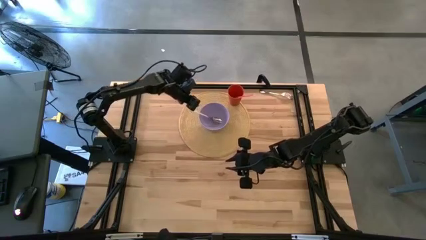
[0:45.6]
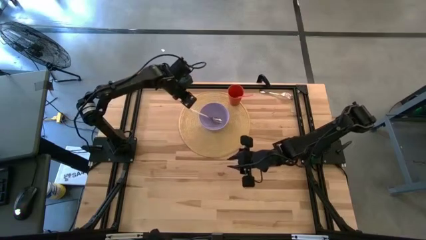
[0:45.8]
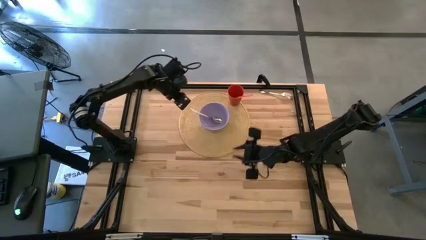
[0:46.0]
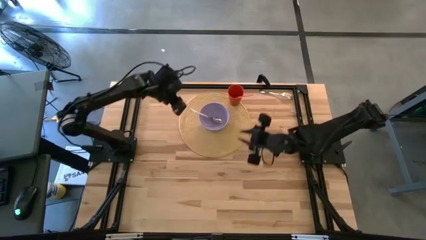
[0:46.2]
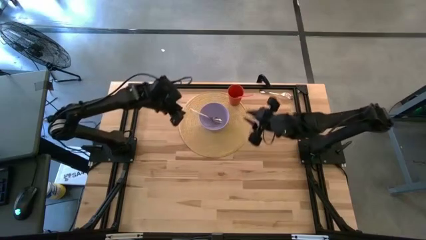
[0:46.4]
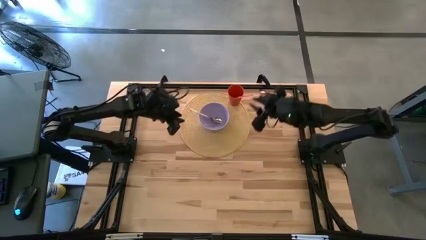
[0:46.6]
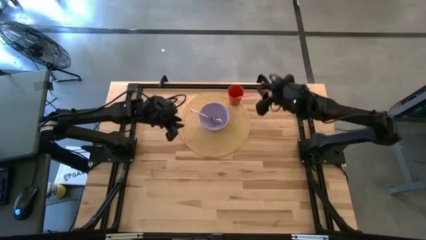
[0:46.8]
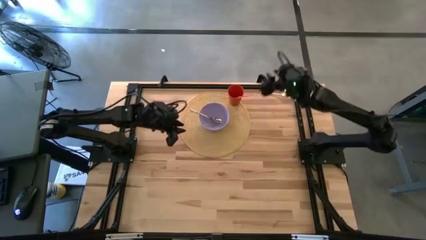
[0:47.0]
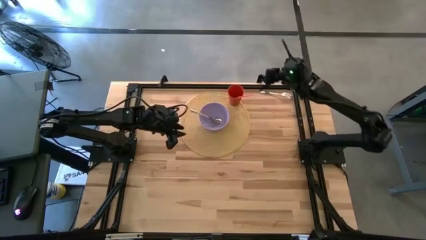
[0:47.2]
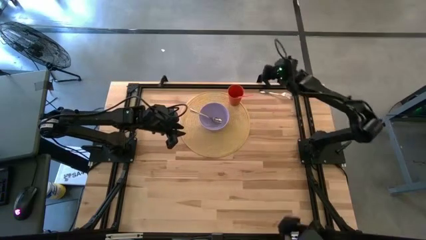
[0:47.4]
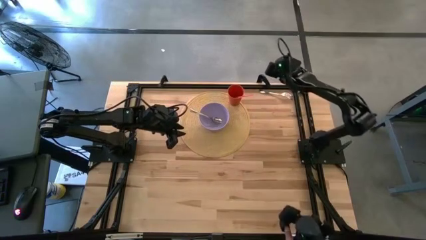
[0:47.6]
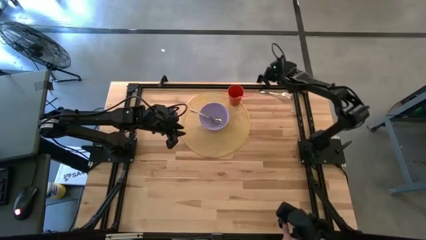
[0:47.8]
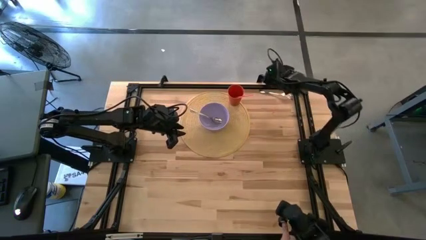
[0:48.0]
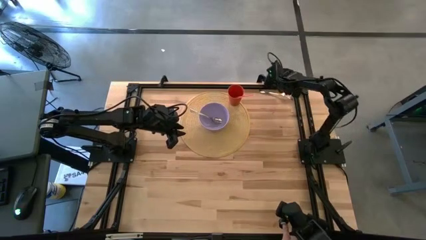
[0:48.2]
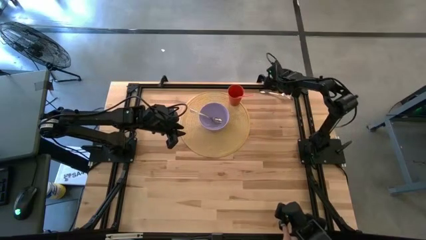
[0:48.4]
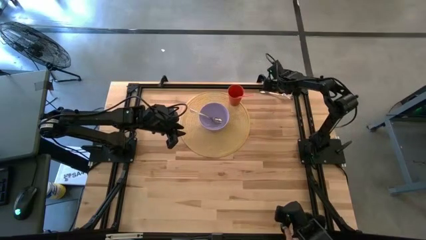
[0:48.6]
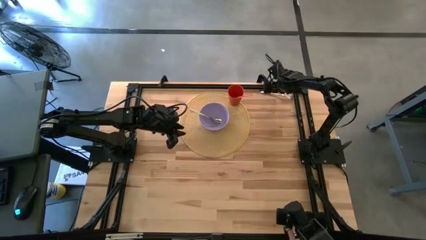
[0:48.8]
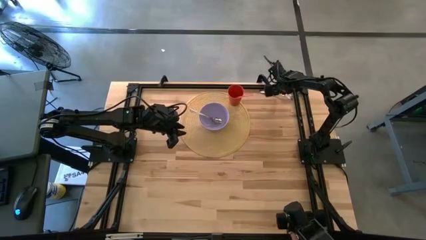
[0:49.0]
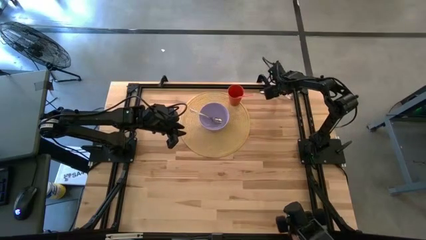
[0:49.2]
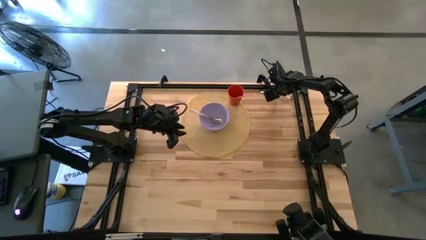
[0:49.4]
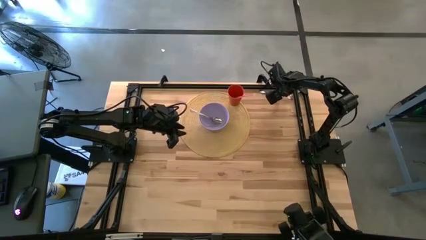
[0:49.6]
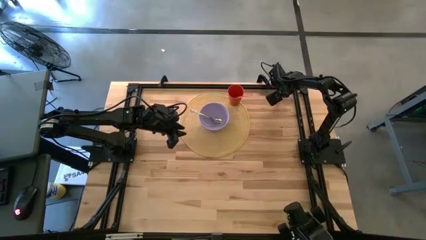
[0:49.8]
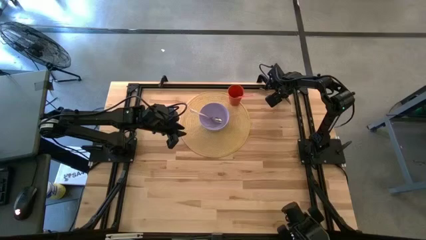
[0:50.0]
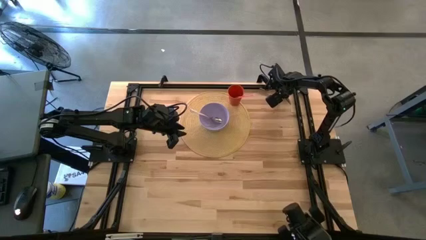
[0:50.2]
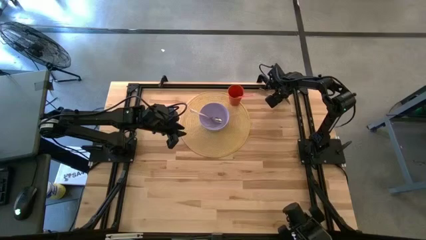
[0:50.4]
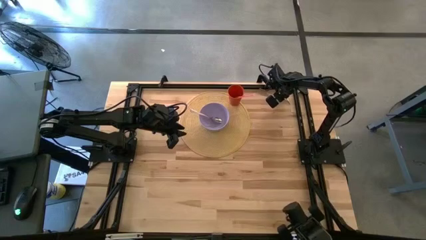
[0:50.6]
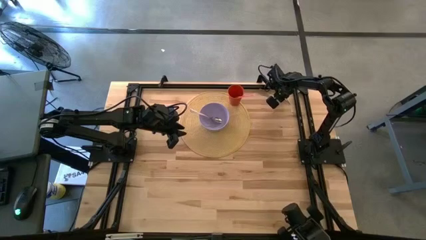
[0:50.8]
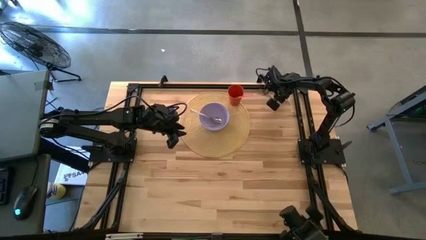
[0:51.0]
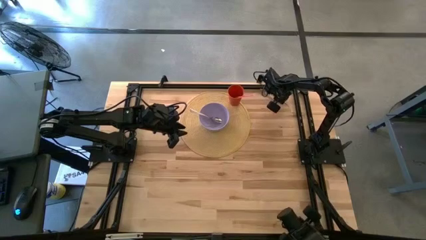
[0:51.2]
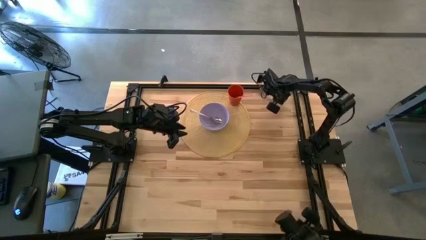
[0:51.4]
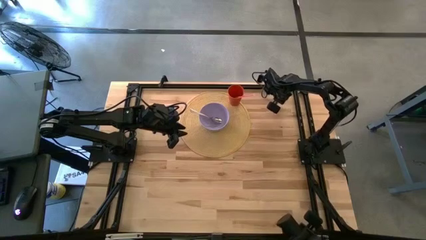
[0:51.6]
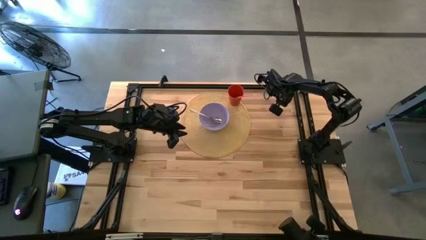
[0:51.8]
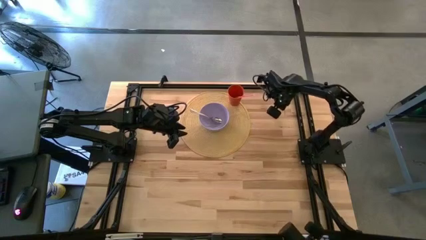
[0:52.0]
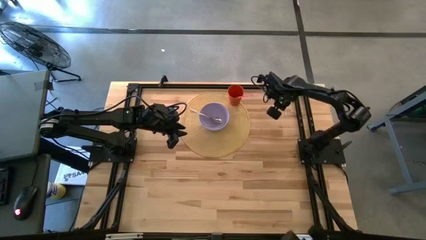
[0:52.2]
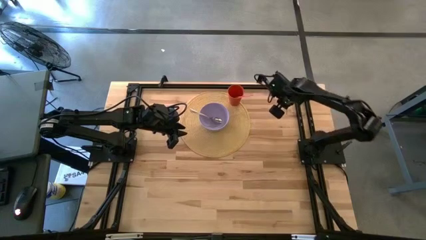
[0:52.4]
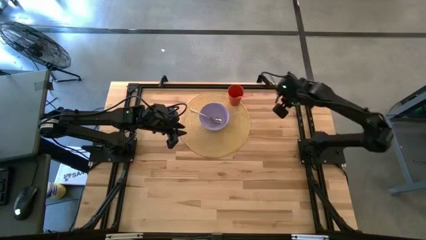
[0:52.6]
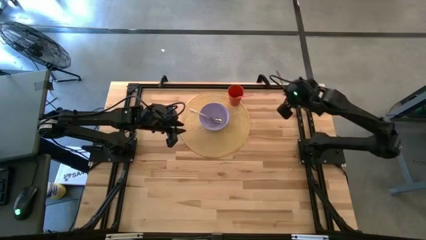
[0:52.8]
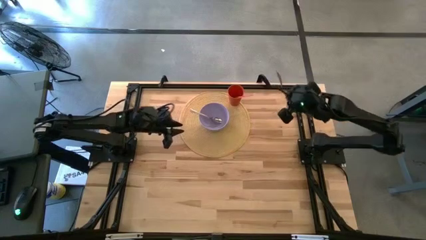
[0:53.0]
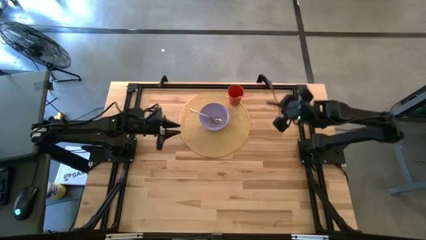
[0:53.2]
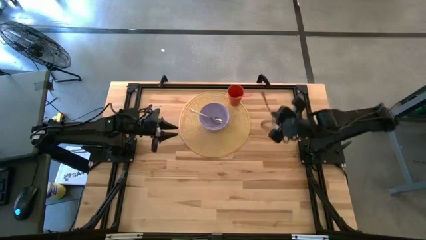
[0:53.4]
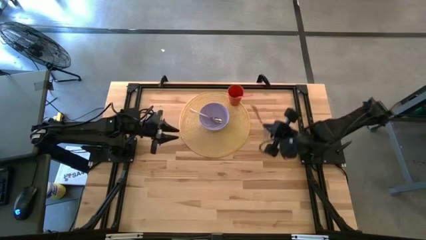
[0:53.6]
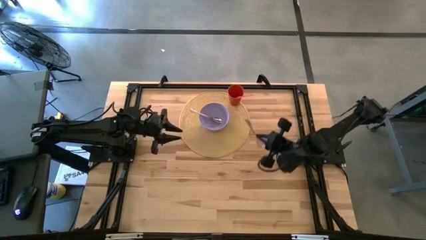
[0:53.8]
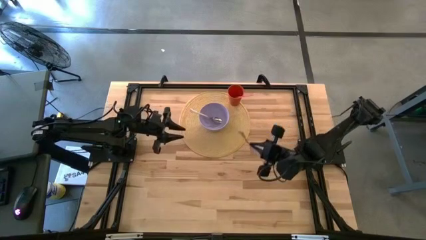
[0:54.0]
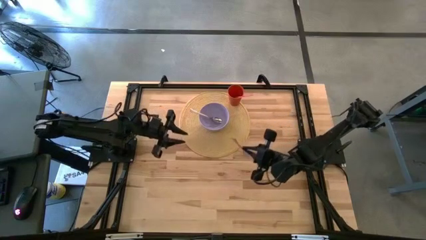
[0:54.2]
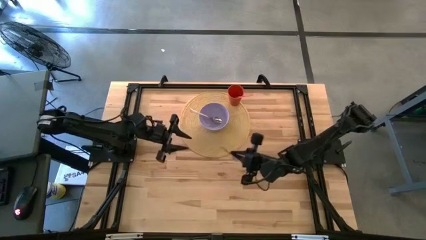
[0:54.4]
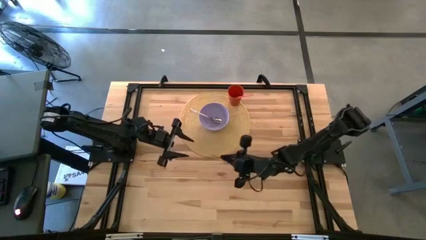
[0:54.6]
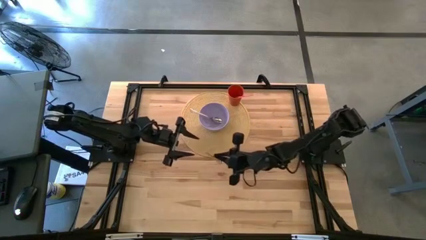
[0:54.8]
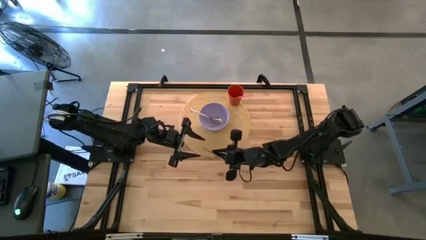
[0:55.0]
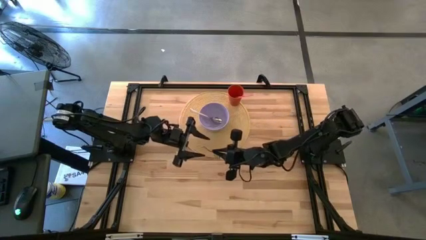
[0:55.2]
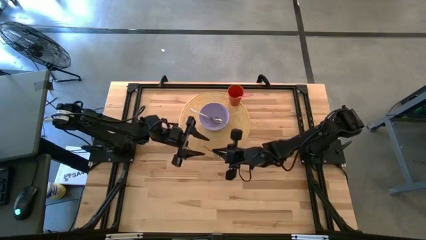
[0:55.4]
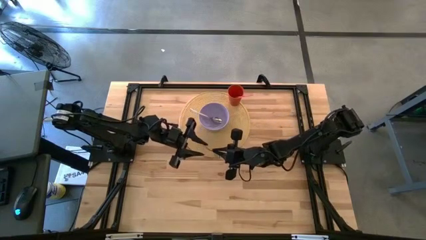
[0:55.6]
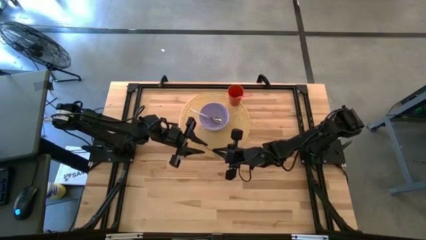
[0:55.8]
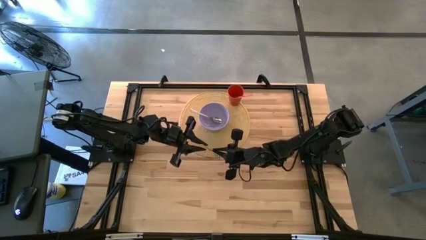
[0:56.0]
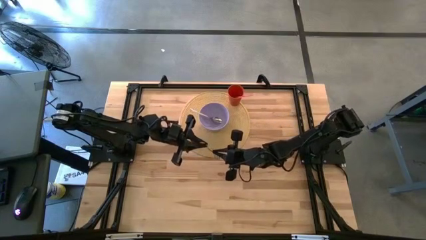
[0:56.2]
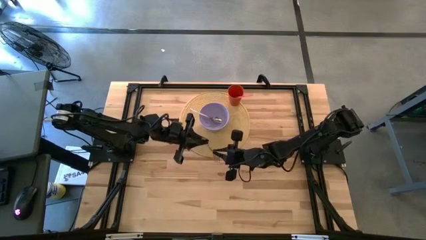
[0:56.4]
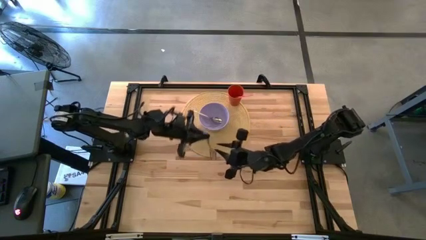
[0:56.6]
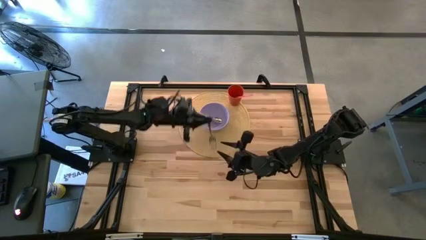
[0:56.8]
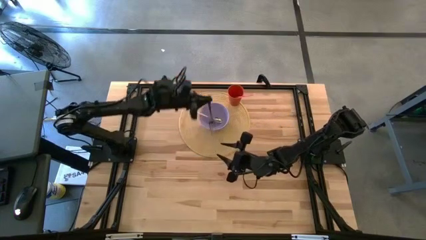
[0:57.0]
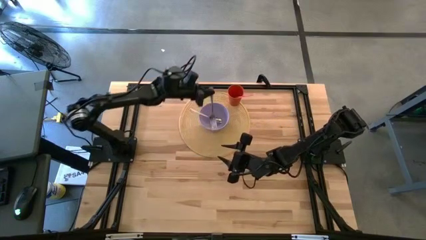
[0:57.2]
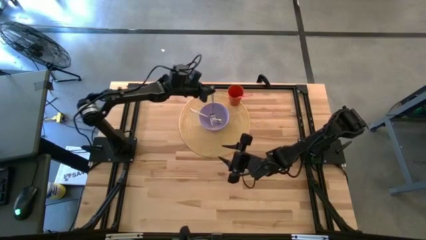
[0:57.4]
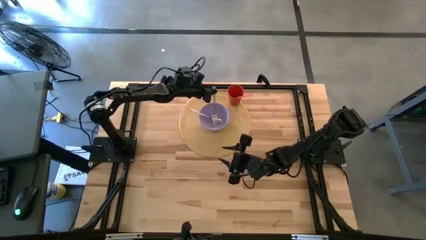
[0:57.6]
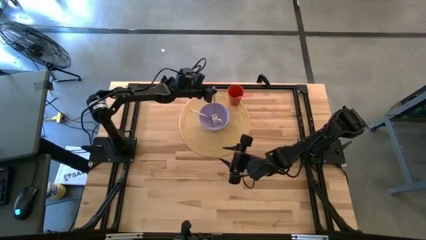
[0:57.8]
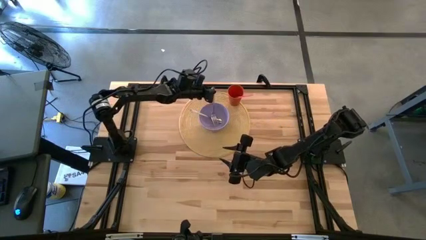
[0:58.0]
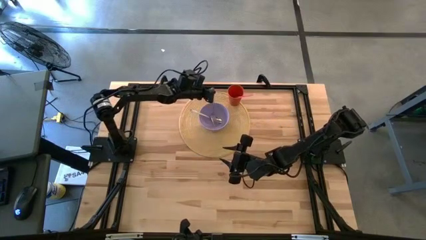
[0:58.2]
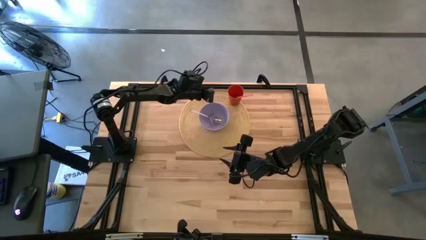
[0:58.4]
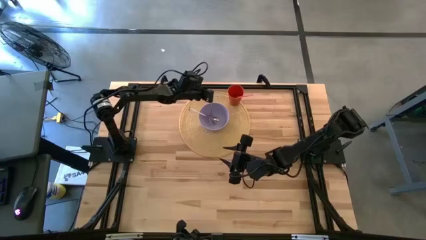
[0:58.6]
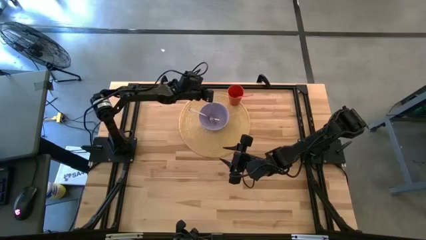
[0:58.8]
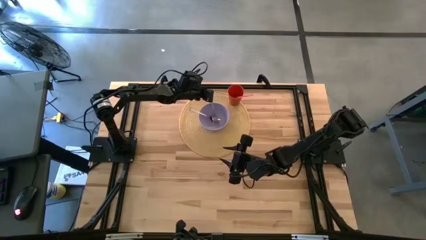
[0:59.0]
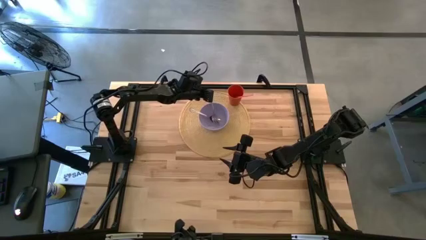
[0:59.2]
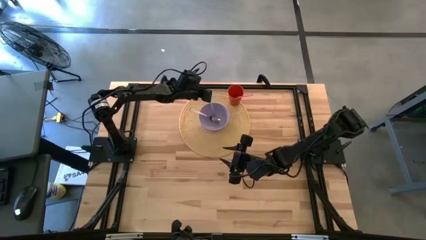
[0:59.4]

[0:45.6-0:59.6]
Task: Pick & Place Utensil
Put the silver fork into the violet bowl

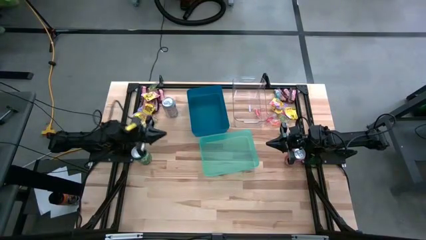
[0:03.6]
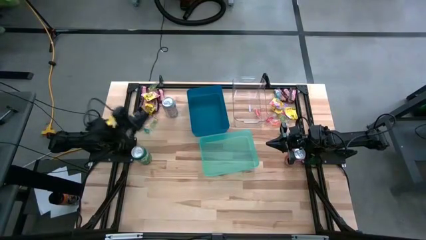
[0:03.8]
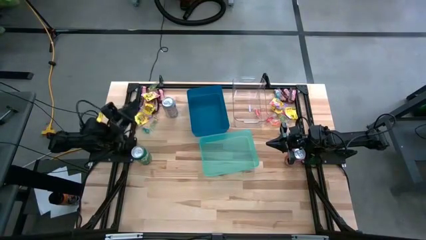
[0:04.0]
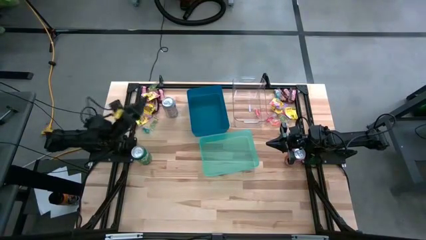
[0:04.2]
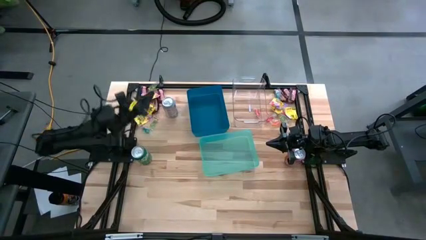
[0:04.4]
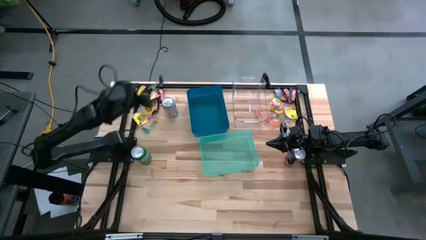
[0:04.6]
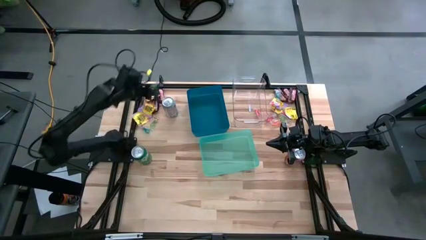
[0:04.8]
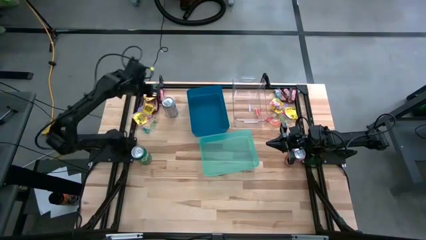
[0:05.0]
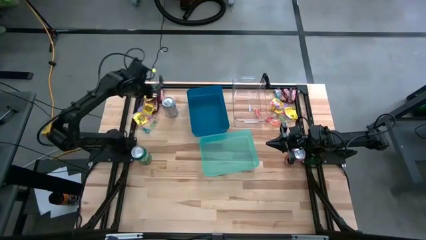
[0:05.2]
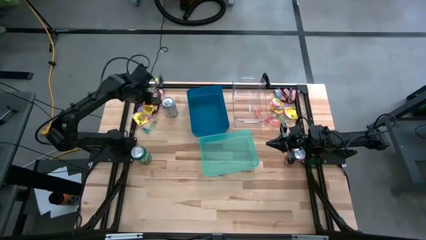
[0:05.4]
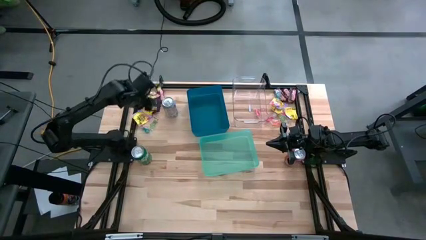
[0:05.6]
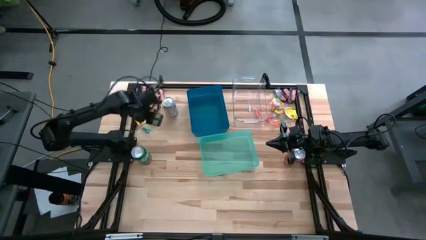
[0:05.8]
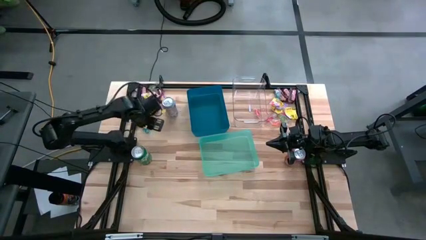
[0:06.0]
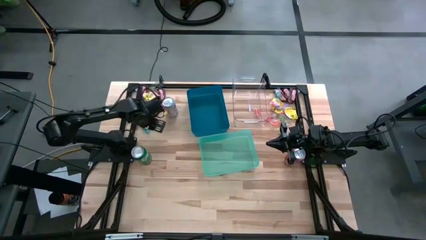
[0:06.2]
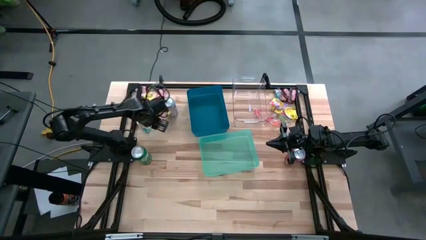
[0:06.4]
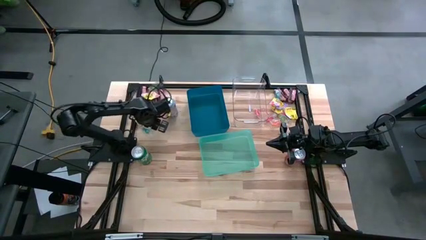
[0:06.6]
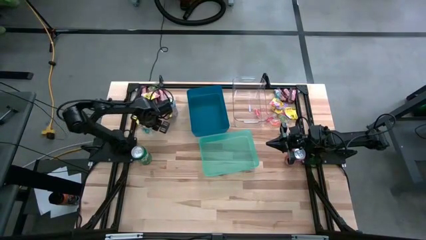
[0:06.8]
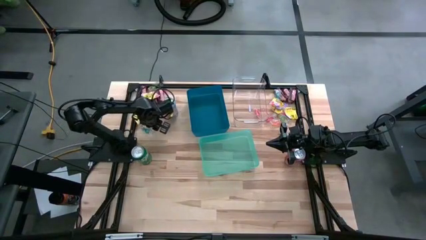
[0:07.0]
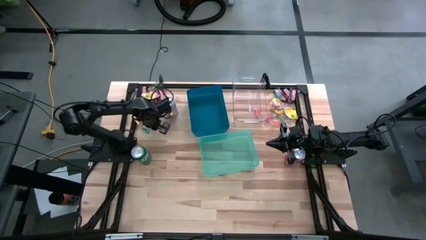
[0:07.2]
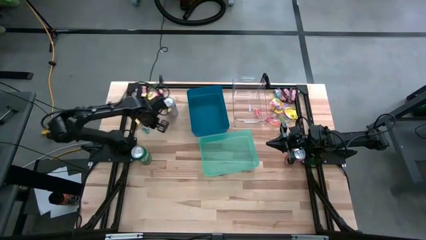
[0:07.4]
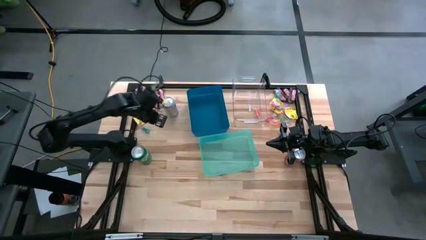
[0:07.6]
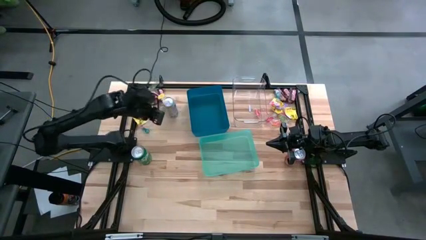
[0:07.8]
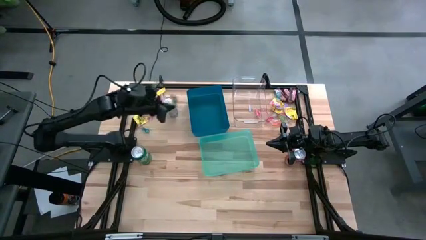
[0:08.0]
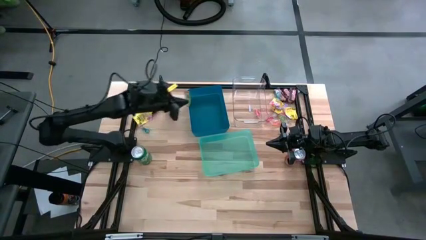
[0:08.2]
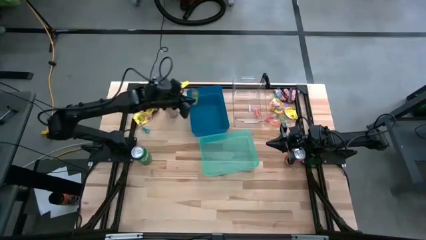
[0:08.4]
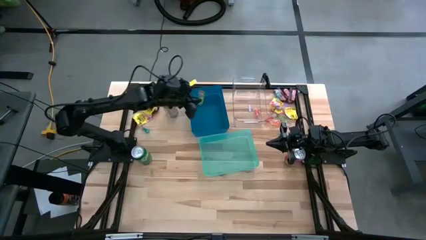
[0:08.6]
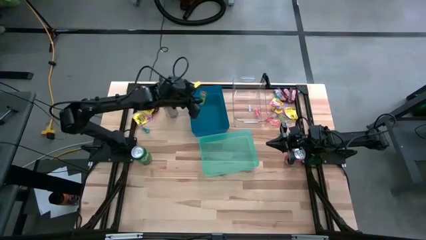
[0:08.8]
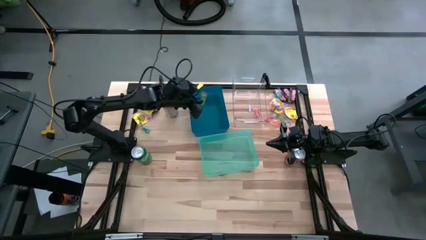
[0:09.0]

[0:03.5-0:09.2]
Task: Sort candy
Put the green candy into the blue bin
